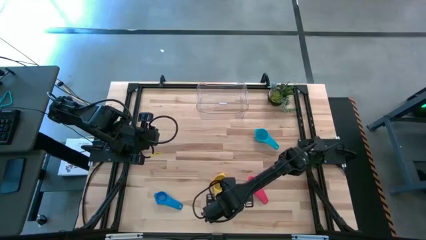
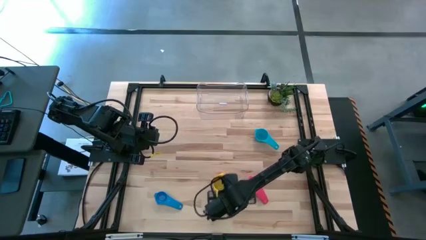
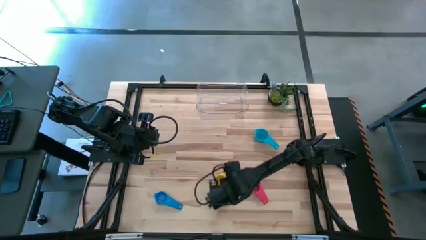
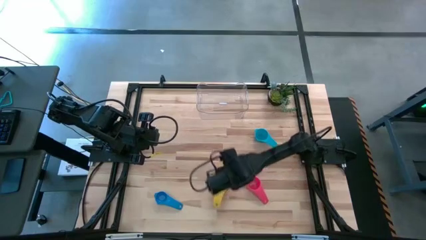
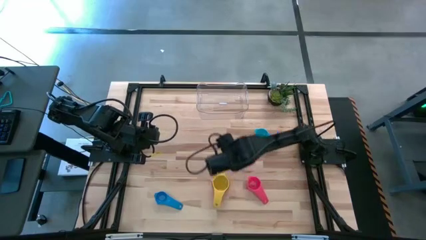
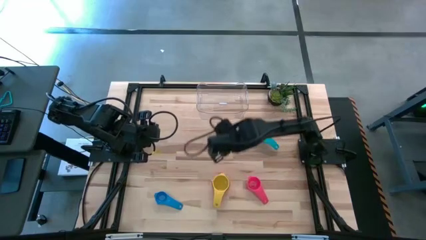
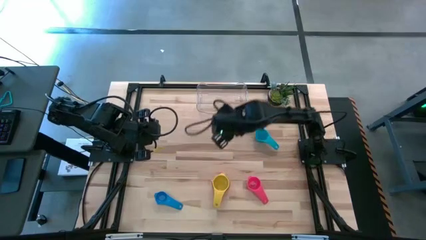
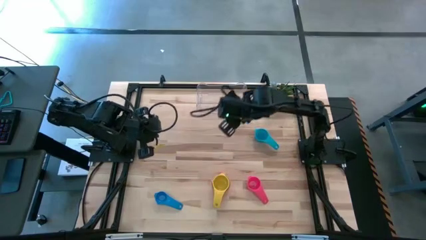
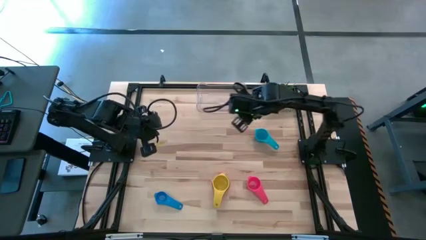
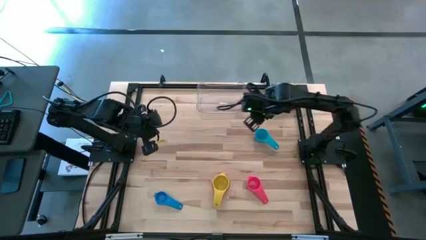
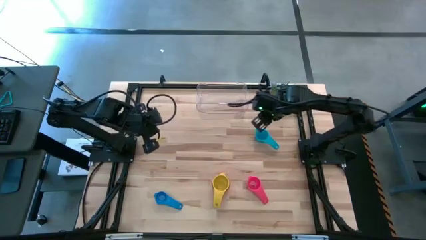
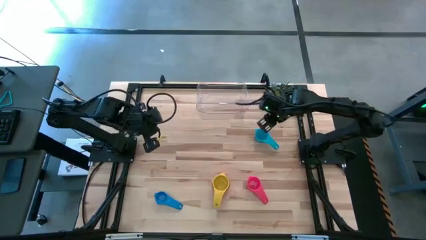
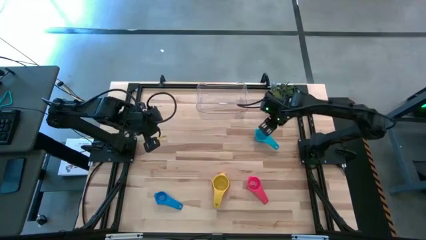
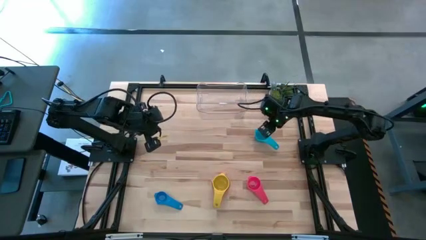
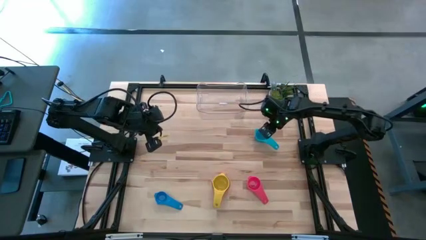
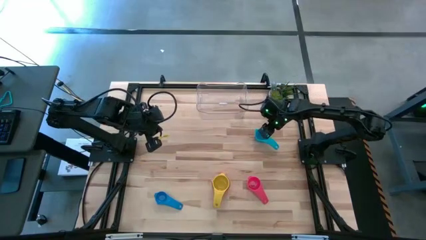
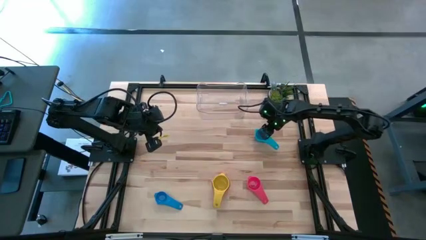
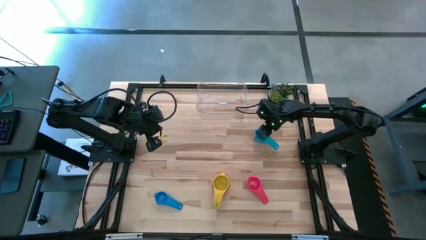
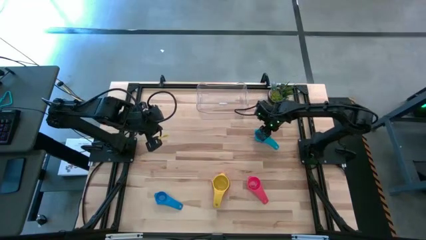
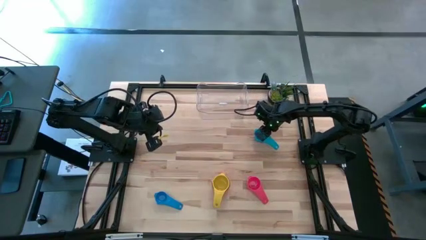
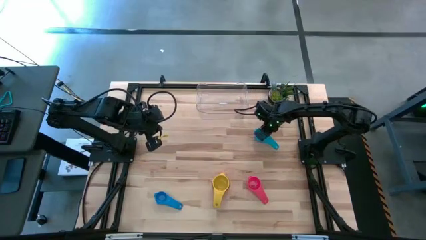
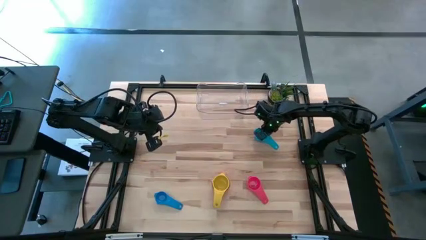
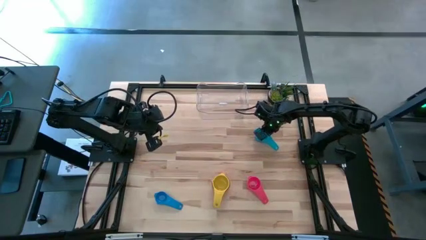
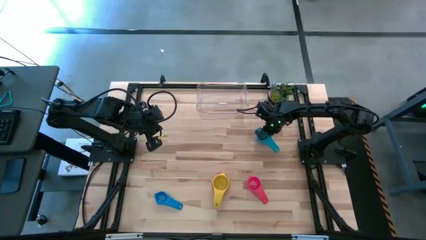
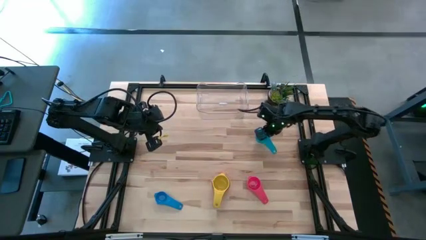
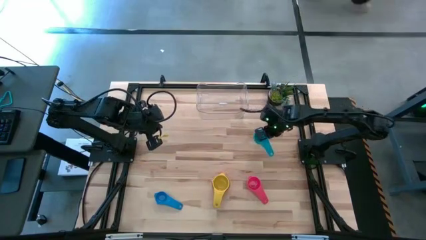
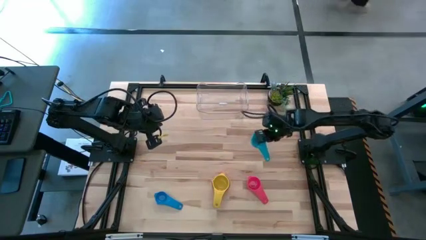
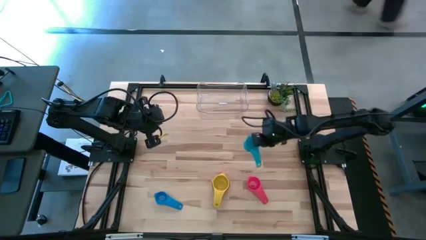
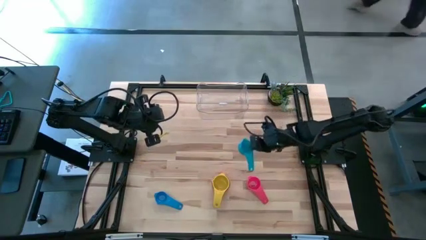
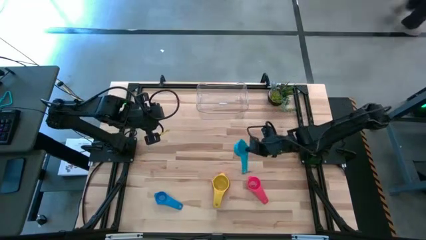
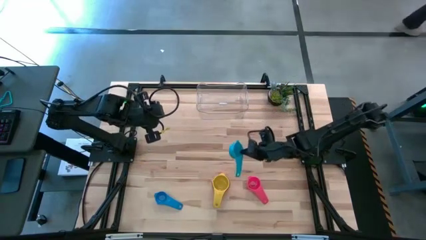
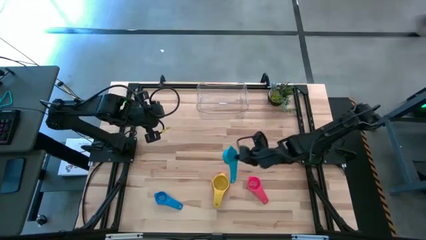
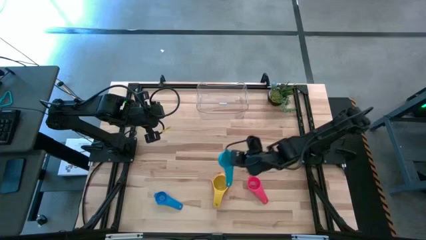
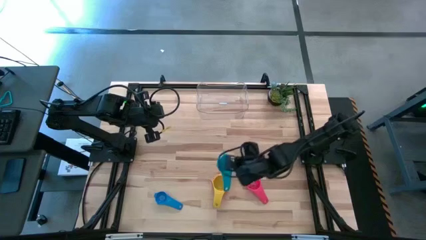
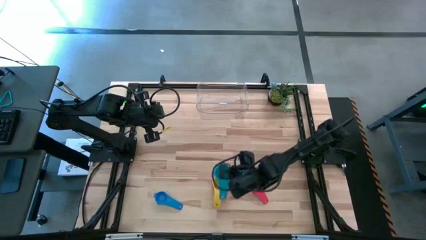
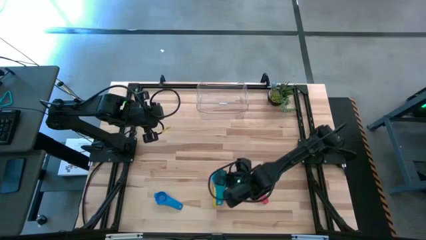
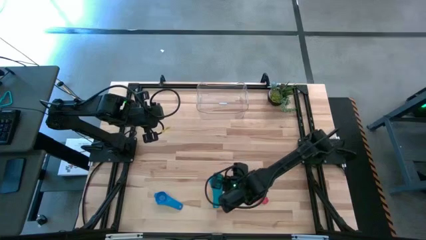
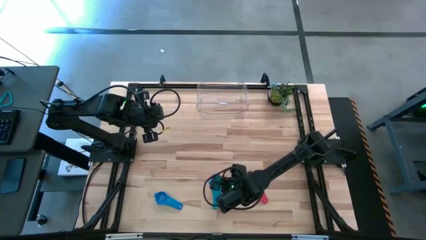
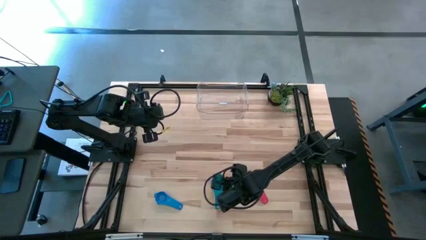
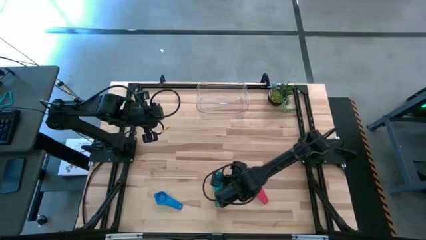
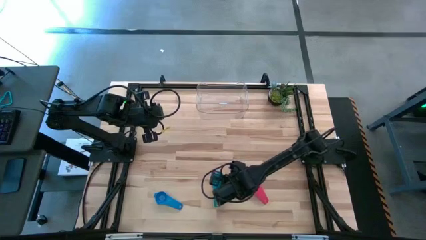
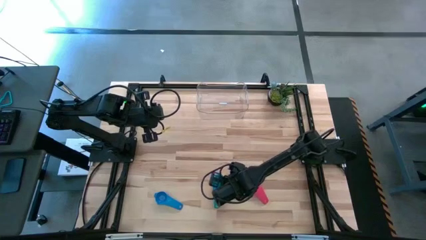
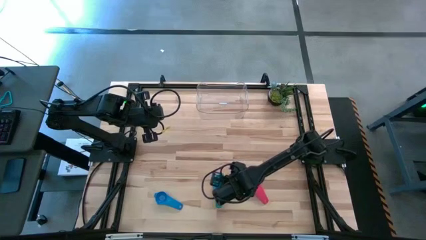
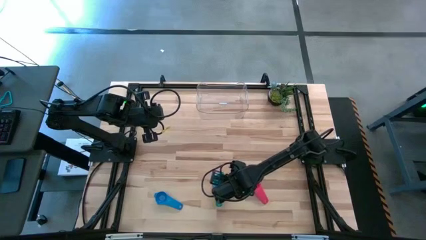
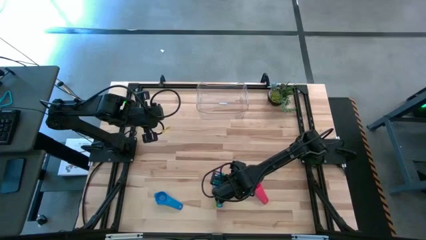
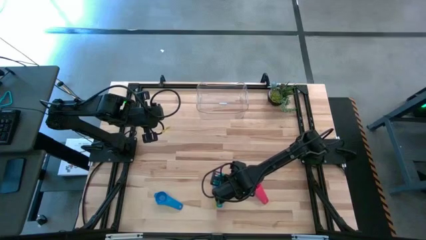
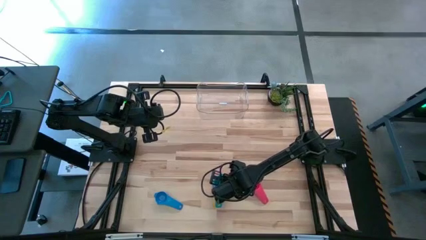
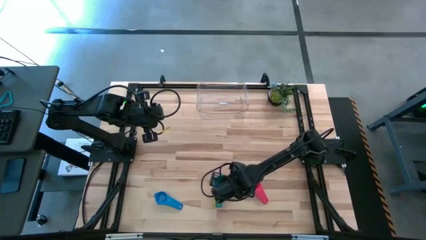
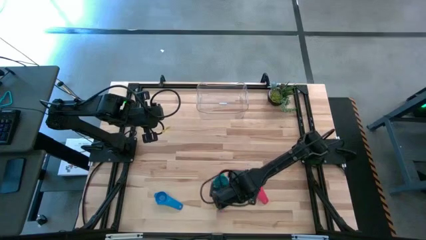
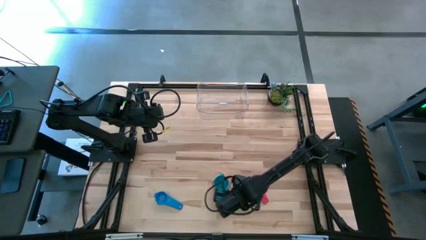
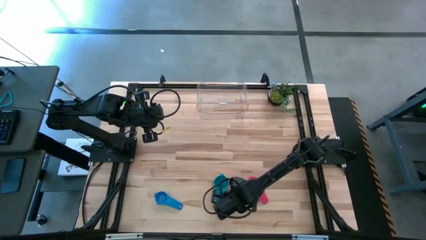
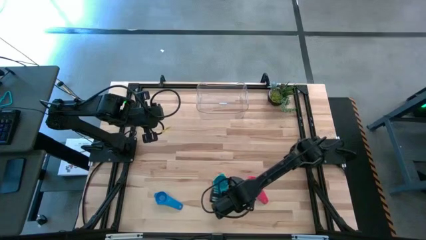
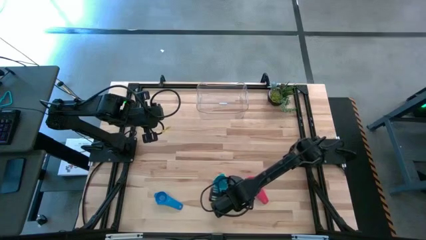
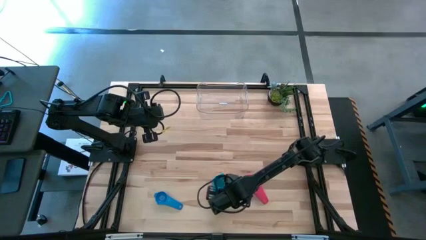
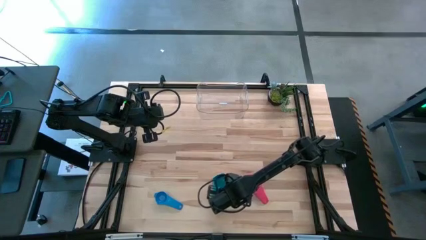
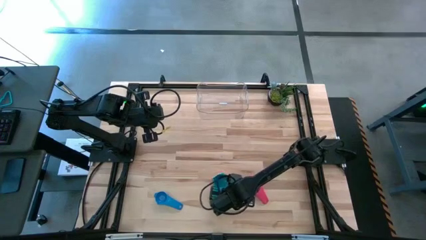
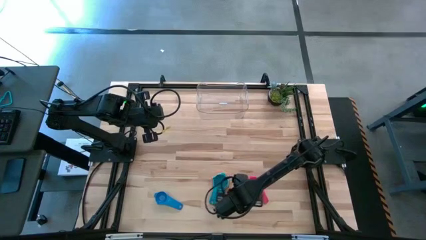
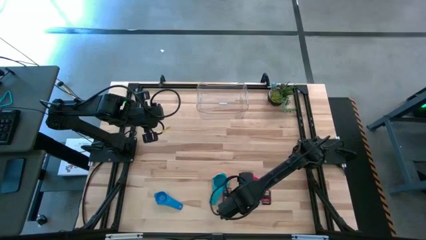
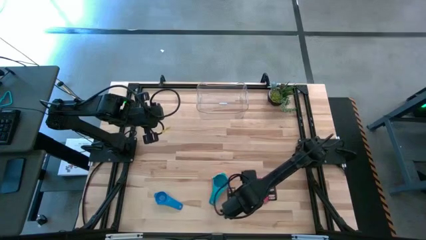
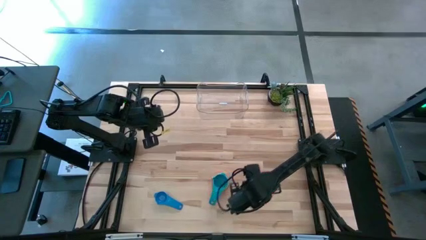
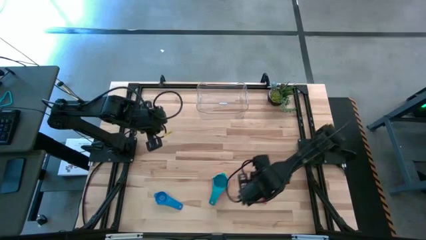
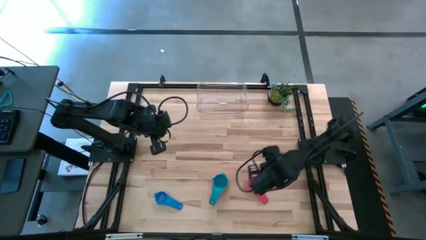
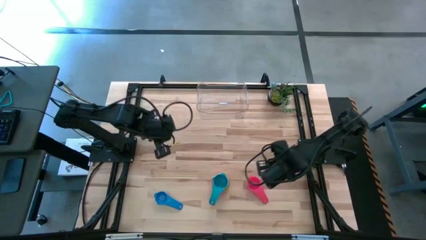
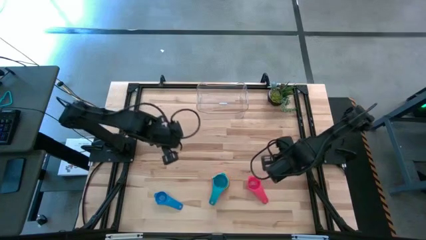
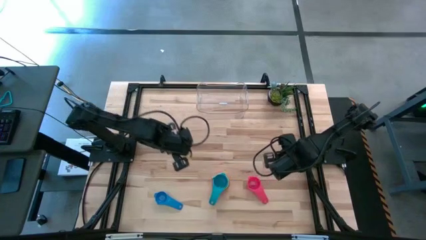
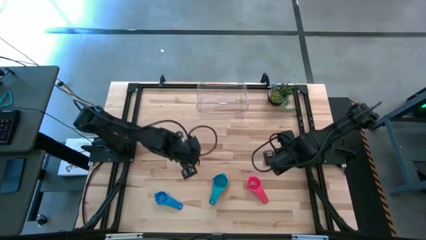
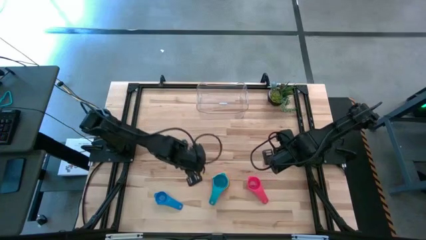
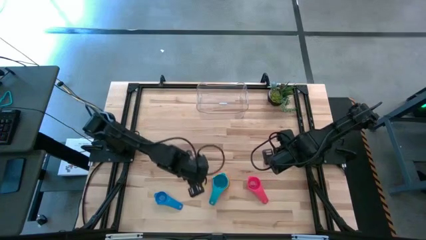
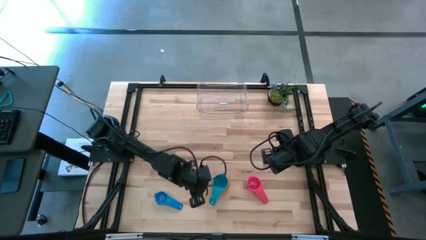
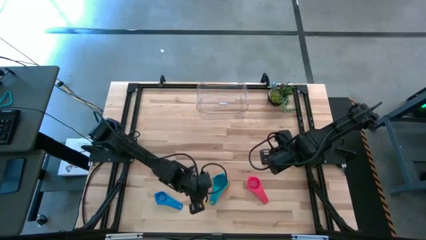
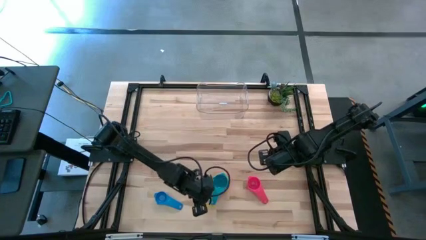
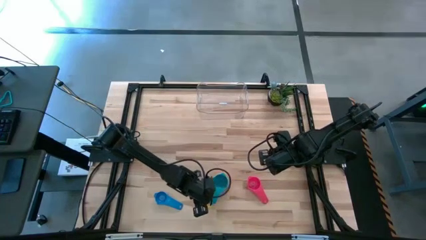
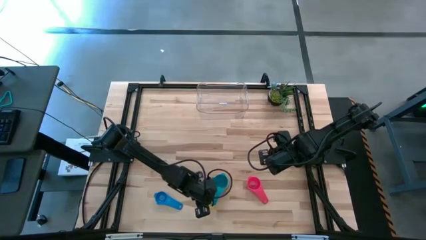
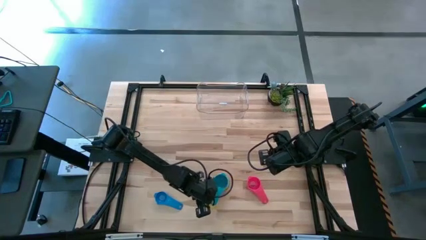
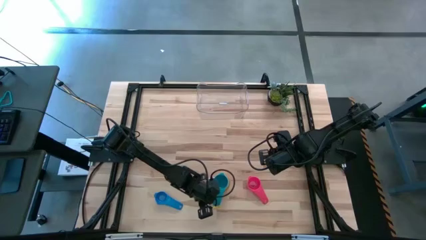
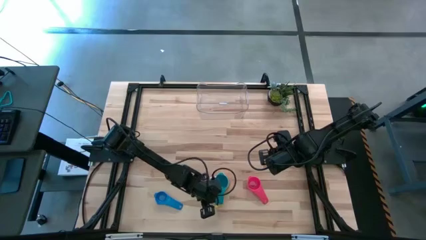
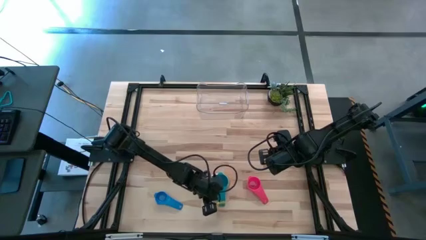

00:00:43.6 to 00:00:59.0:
Task: Nest measuring cups in basket
Stack the light blue measuring cup on top of the yellow measuring cup
